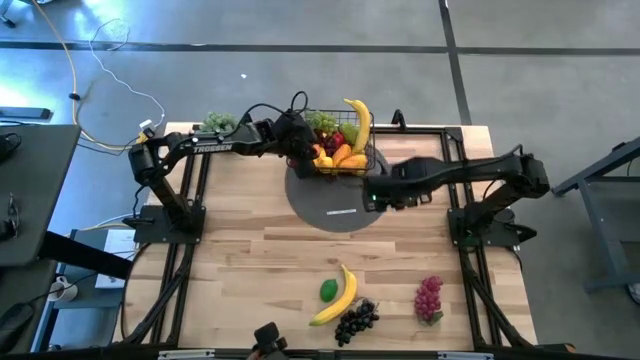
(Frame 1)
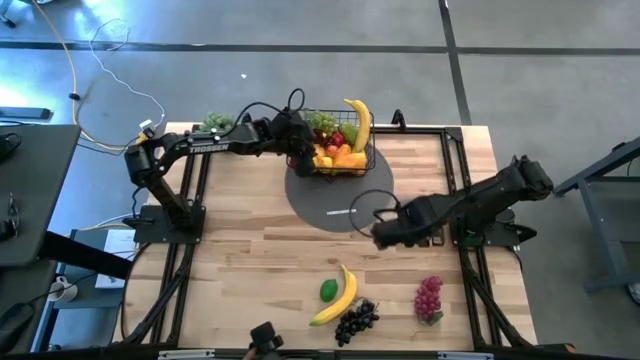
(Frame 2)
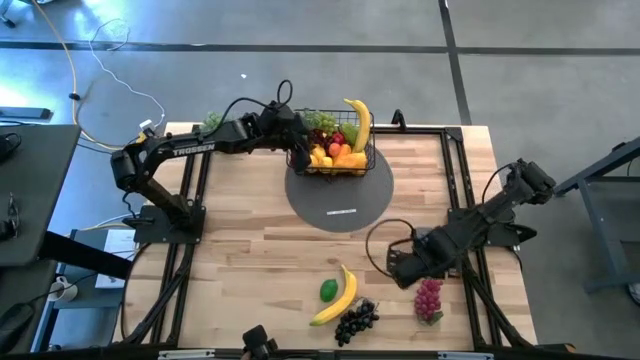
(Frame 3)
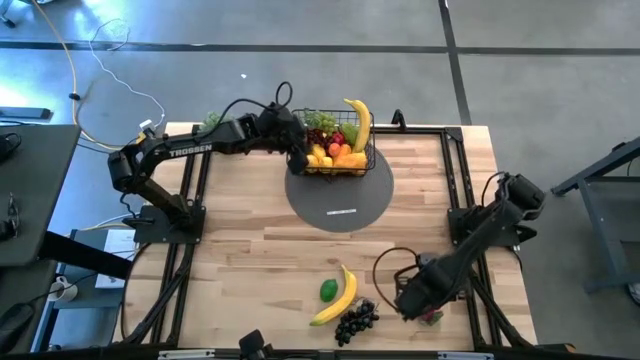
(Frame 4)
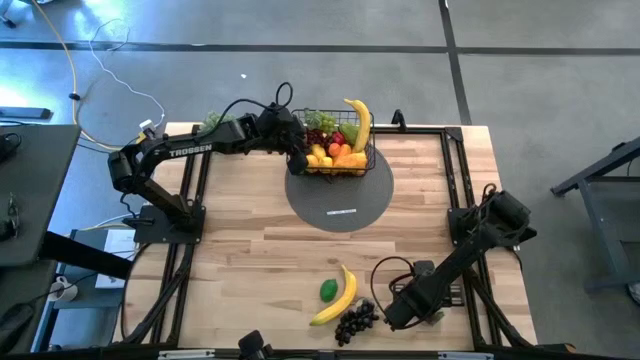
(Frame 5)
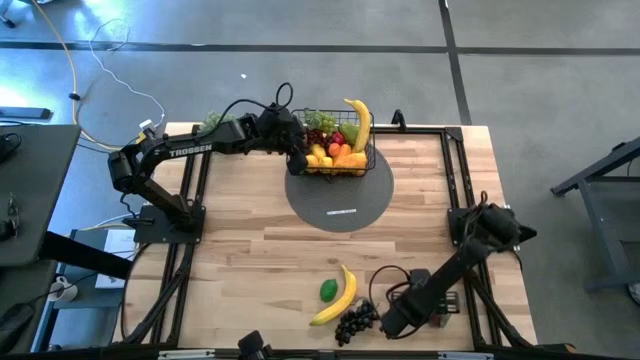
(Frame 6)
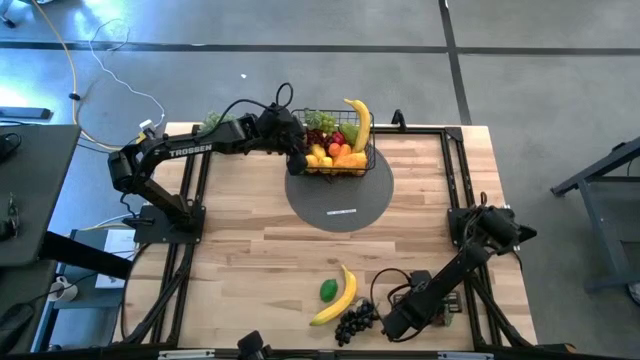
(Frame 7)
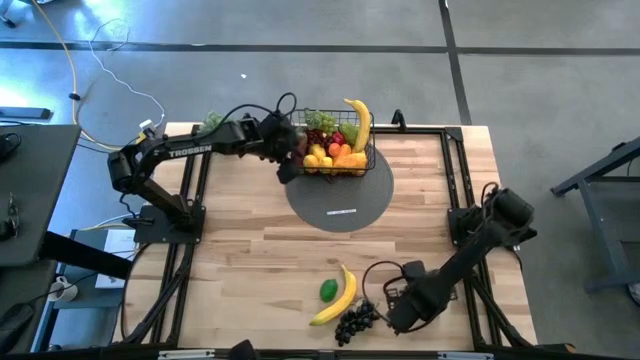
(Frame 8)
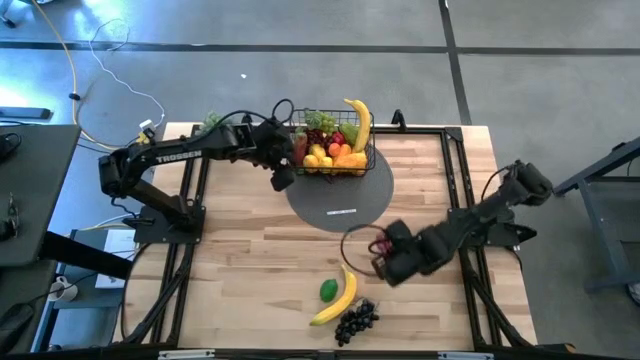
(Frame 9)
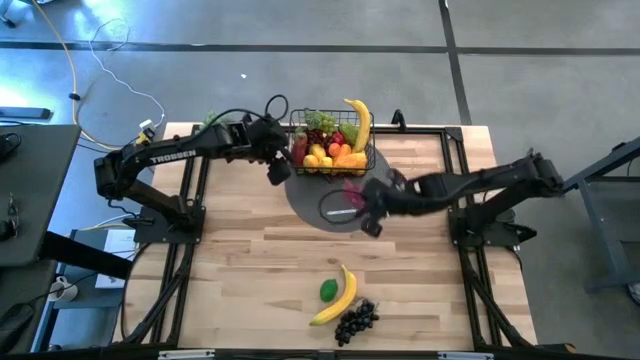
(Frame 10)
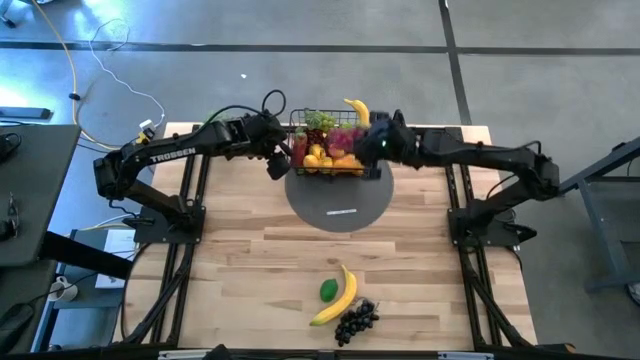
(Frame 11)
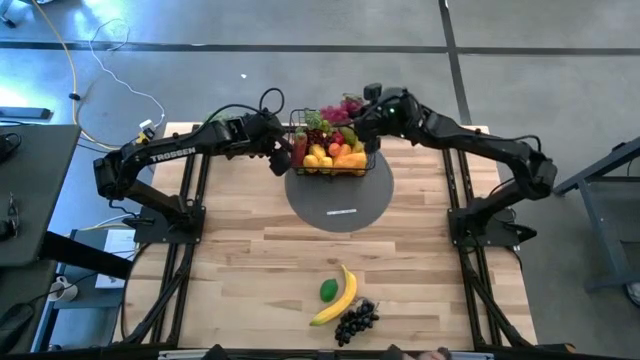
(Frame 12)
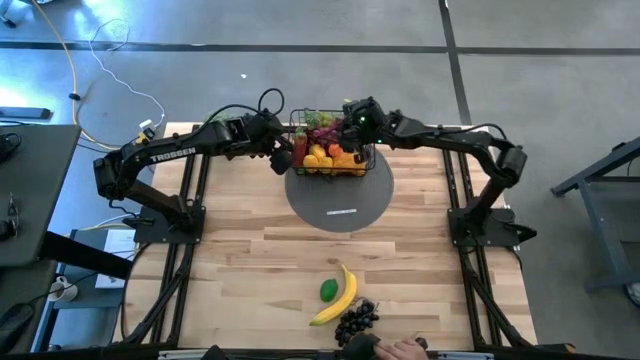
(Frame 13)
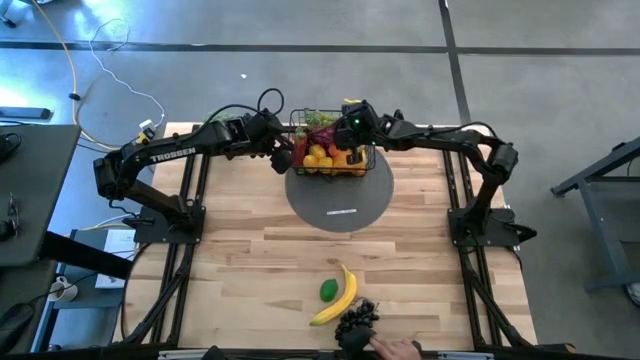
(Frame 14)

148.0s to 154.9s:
Task: Build produce basket
Put the grapes into the wire basket

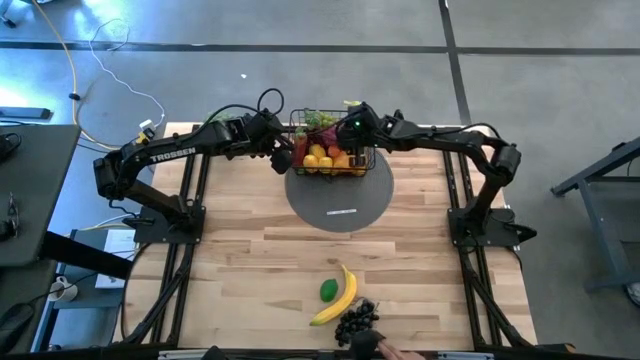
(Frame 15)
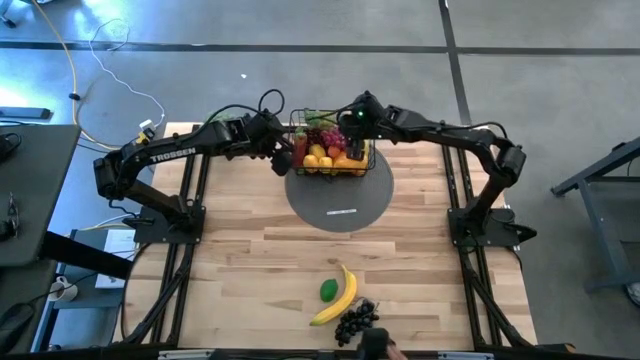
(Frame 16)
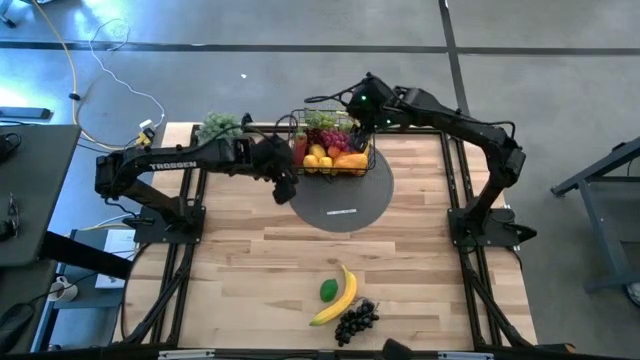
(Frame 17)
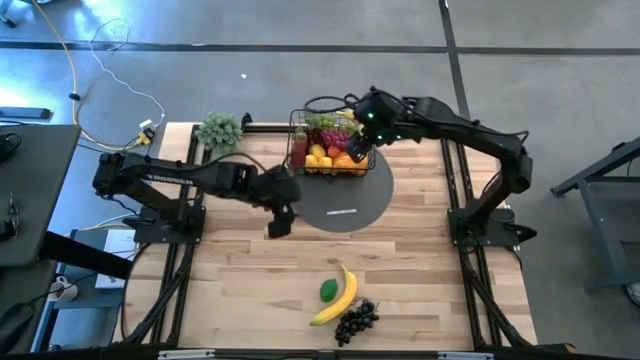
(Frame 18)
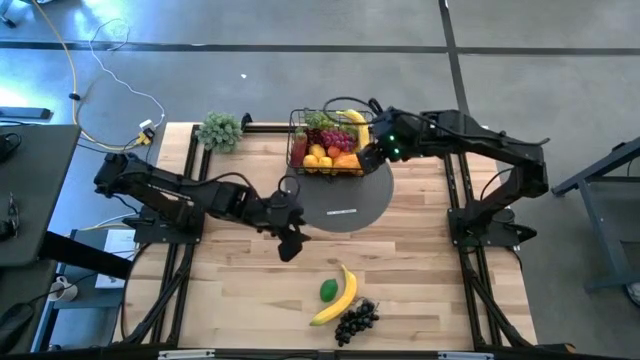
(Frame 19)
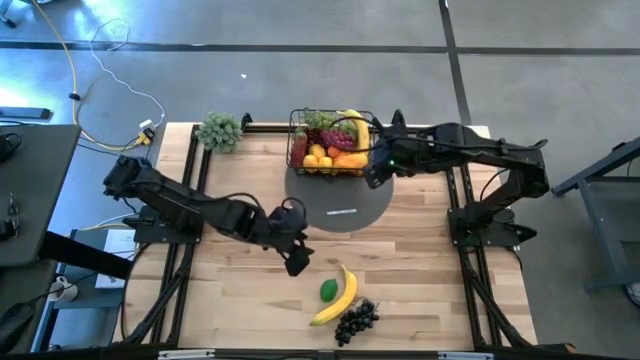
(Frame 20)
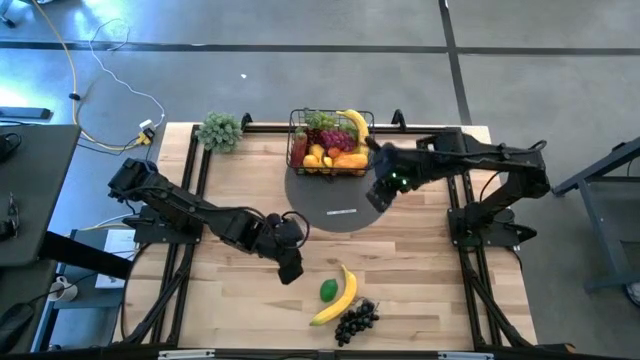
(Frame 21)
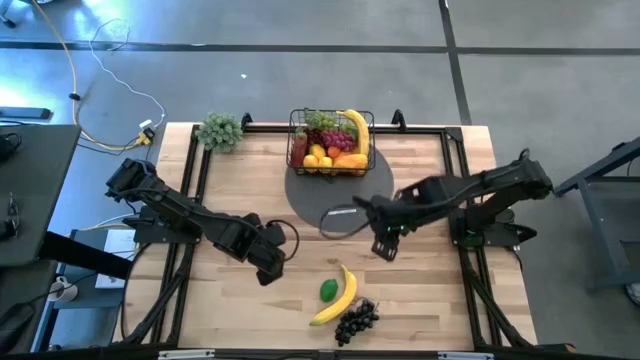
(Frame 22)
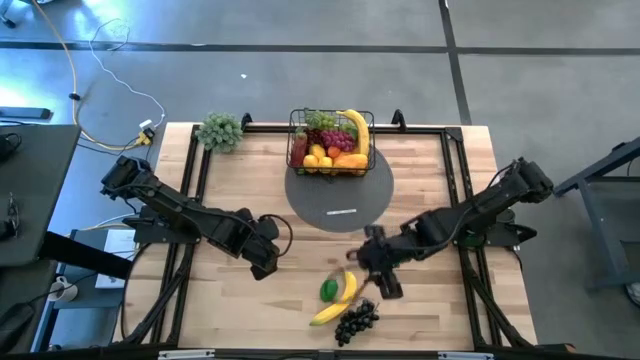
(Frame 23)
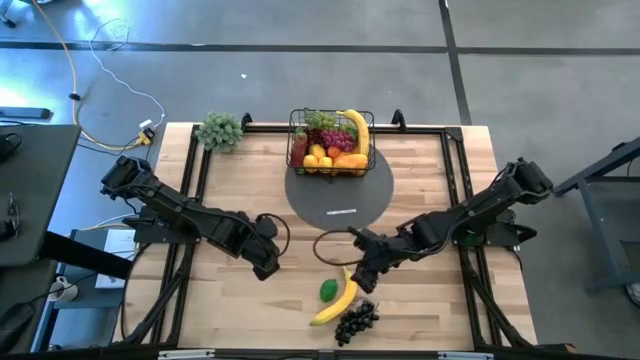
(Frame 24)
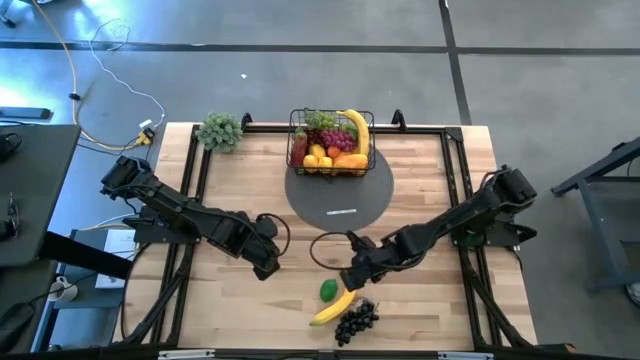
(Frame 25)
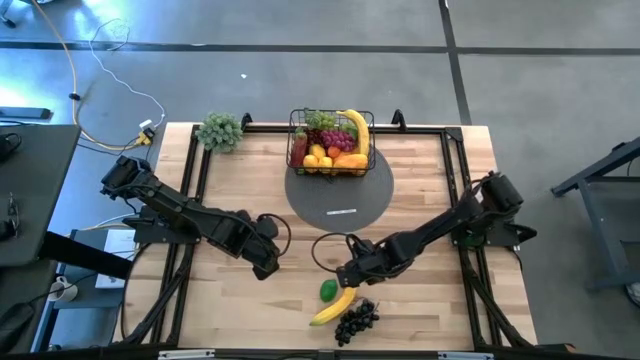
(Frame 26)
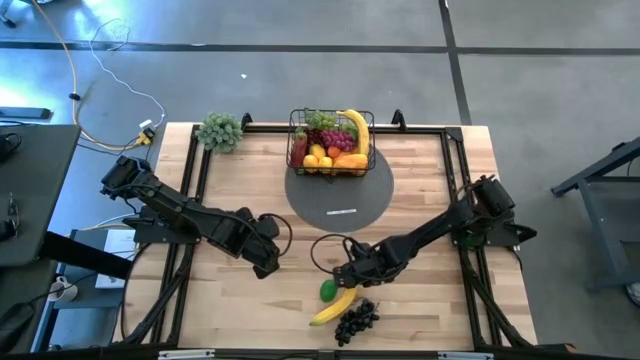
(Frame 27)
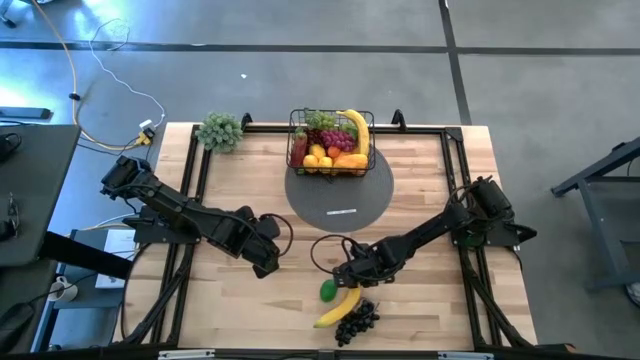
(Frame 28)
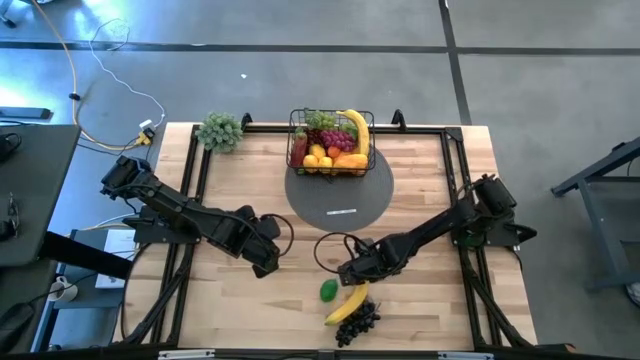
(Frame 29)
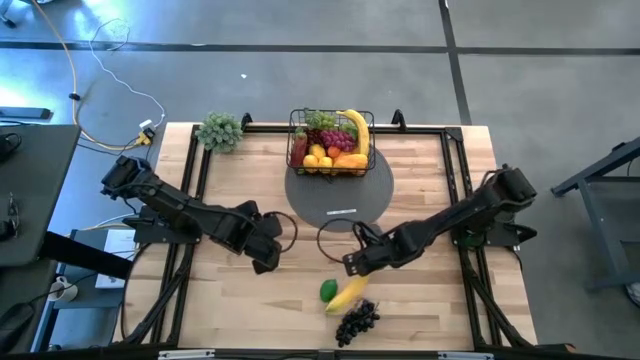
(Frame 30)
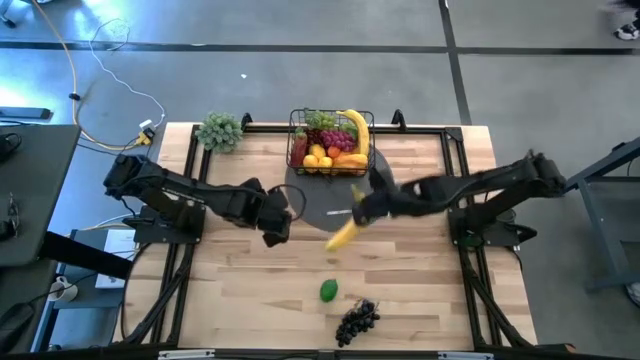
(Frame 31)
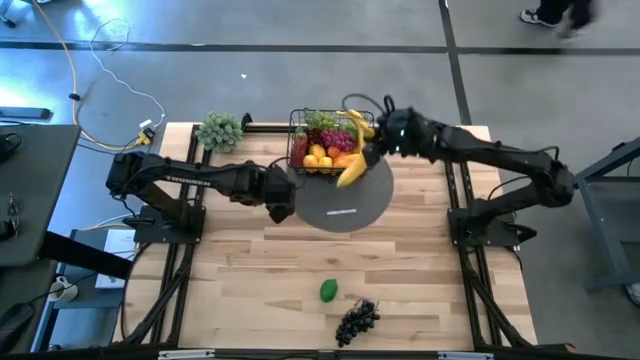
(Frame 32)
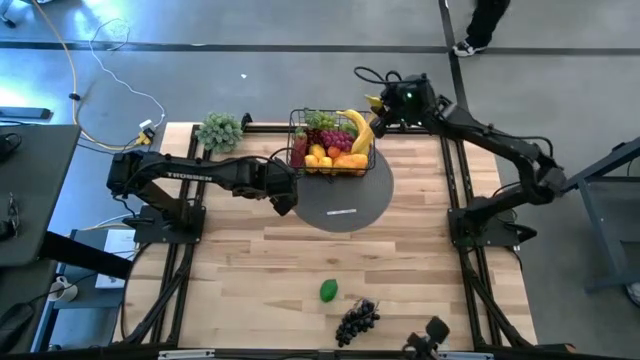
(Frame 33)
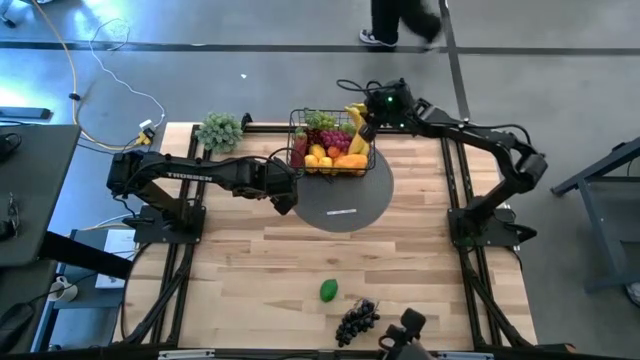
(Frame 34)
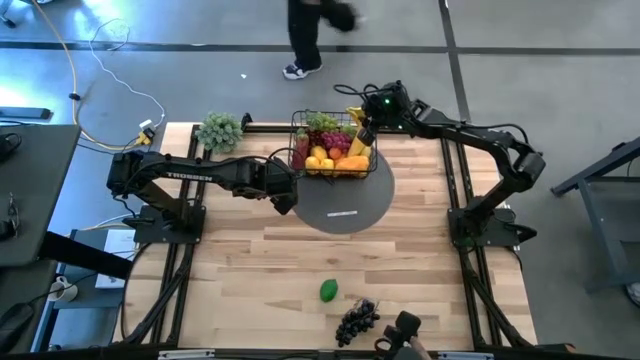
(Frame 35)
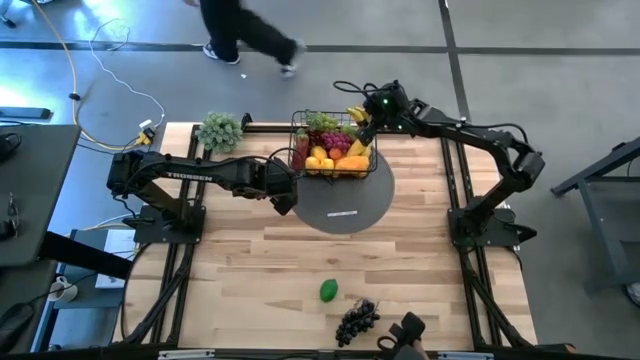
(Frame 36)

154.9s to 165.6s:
Put the banana into the wire basket

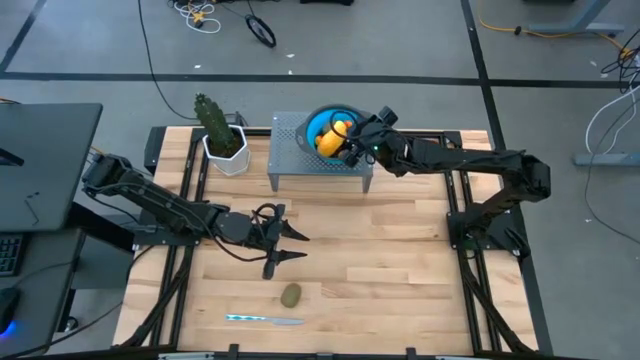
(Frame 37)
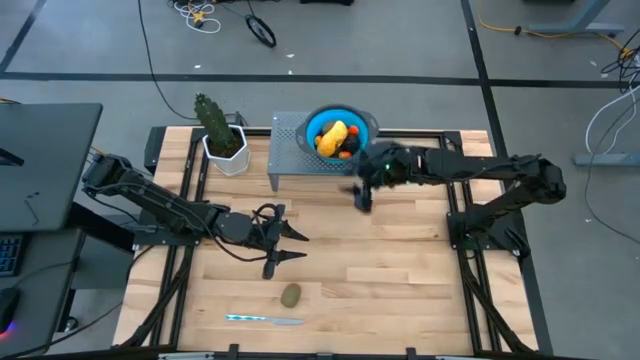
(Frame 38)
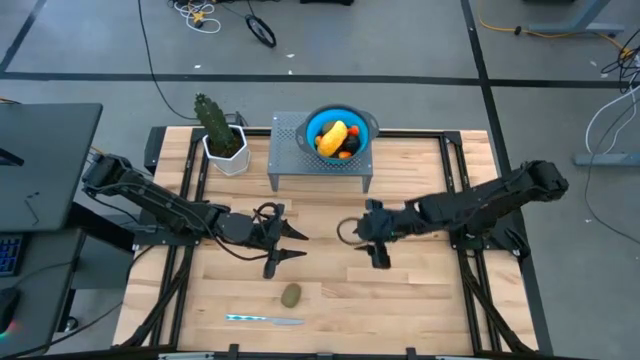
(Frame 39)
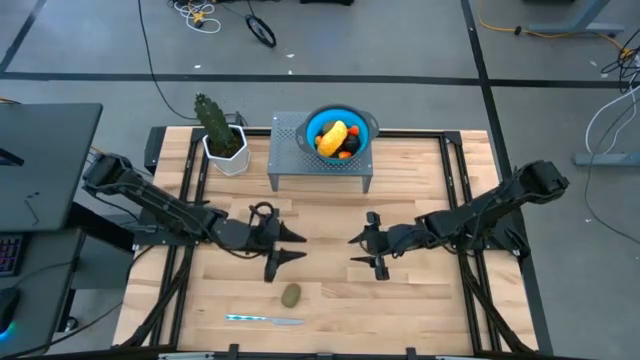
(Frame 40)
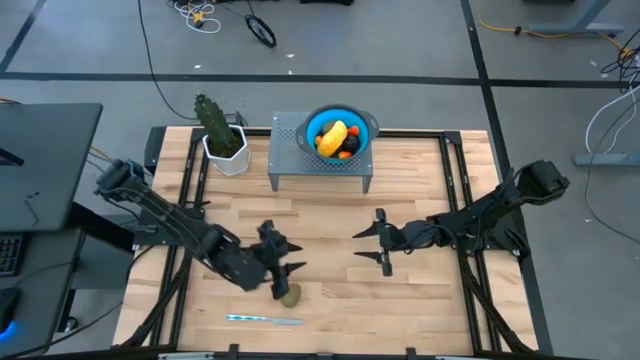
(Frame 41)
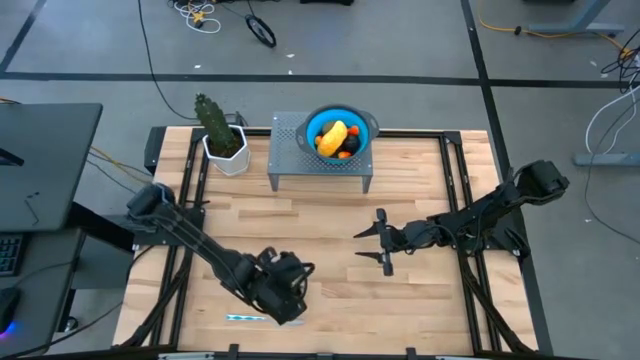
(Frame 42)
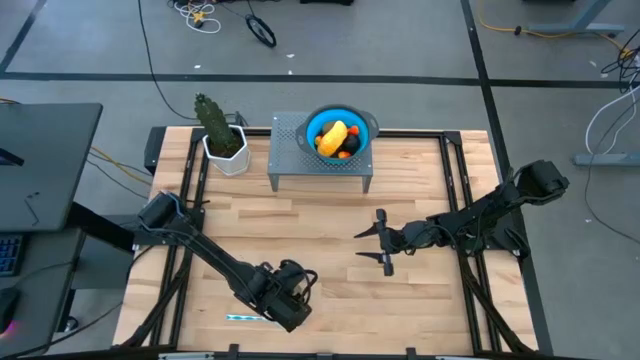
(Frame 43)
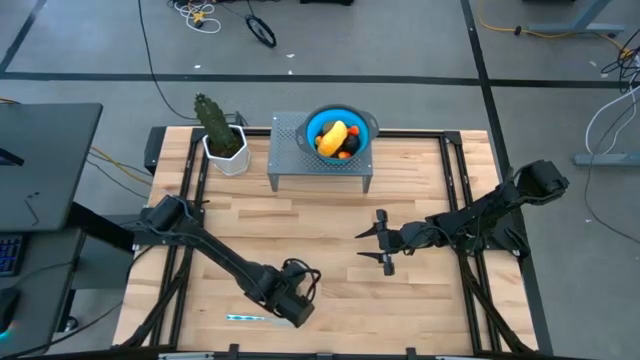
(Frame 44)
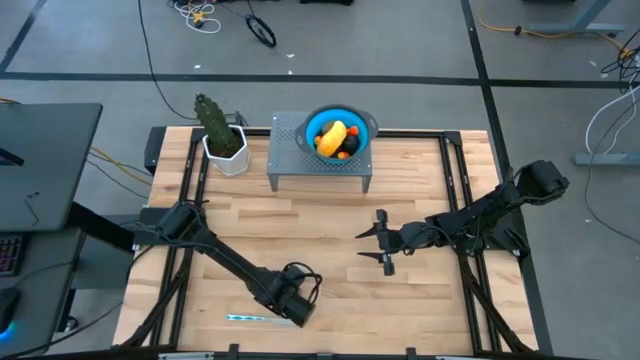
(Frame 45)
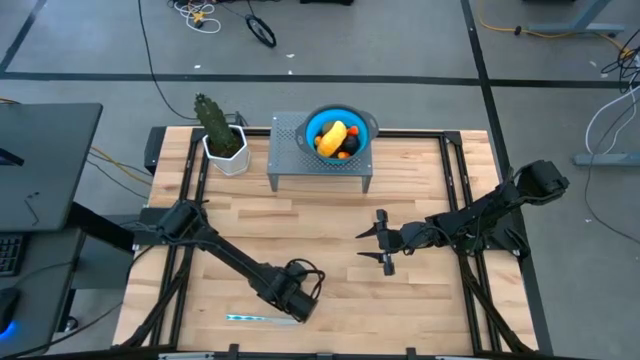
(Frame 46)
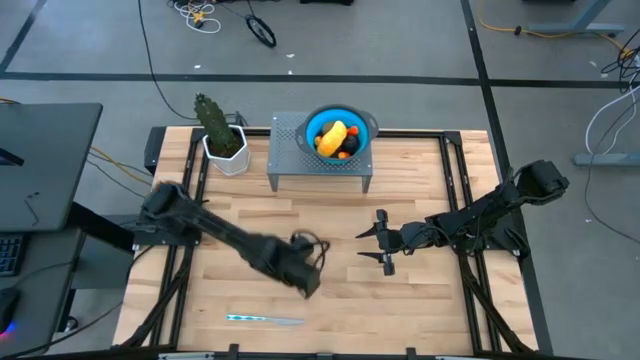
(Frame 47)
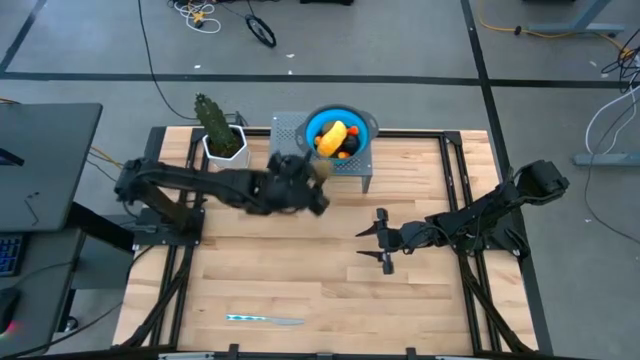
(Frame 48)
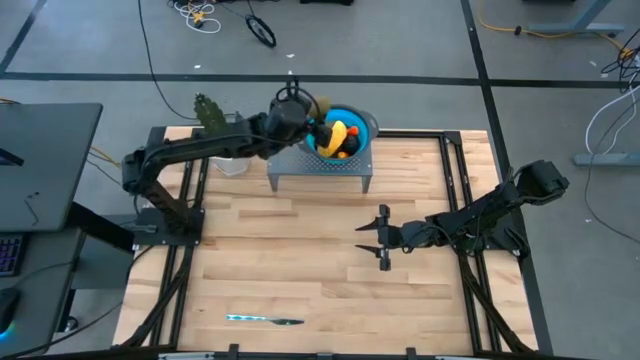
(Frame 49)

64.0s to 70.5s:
Task: Pick & Place Fruit
Put the green kiwi in the blue strainer bowl on the shelf
